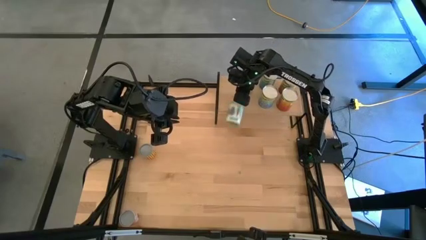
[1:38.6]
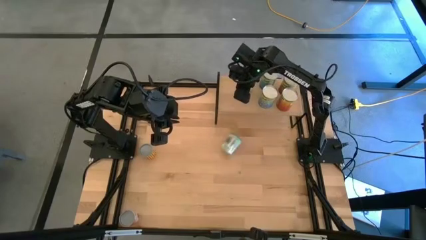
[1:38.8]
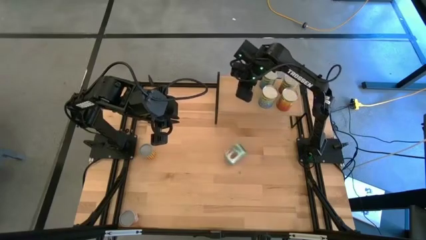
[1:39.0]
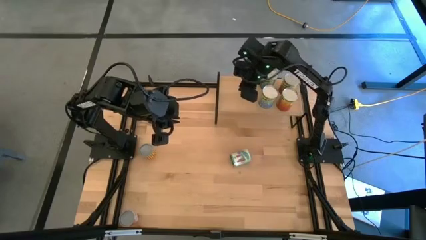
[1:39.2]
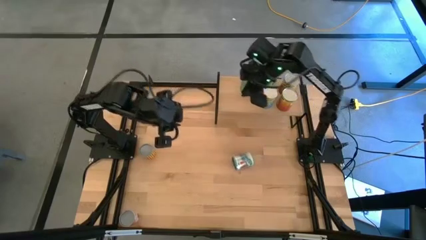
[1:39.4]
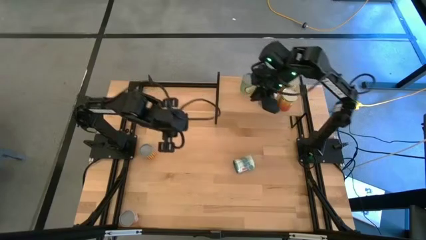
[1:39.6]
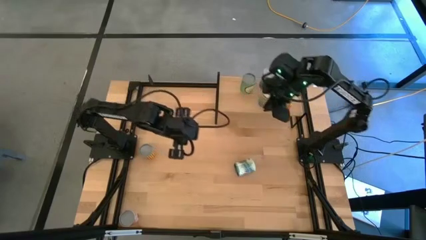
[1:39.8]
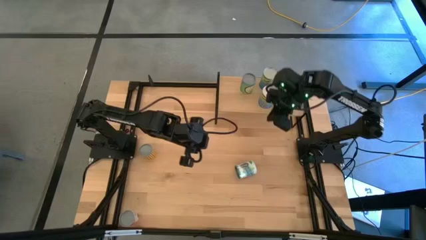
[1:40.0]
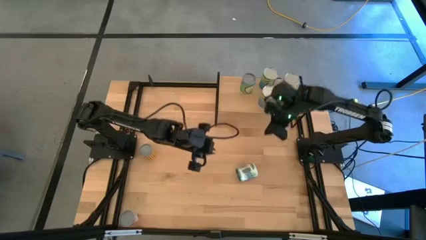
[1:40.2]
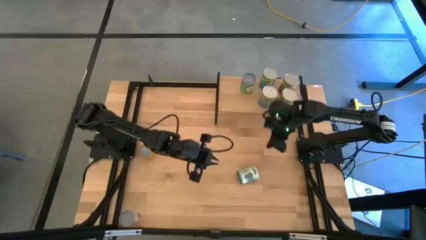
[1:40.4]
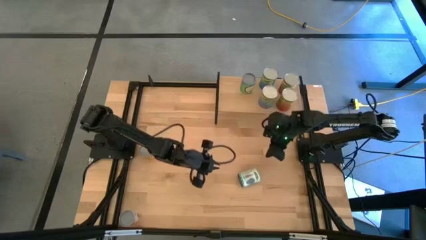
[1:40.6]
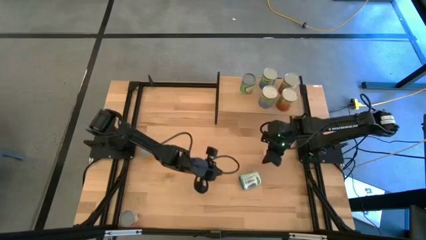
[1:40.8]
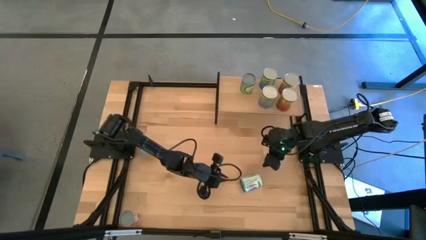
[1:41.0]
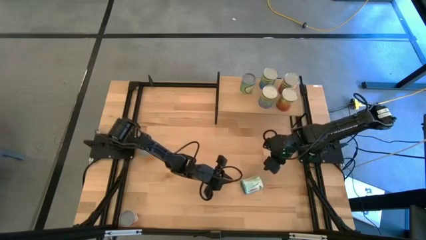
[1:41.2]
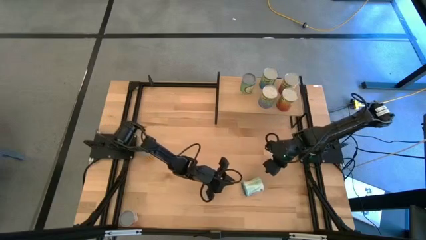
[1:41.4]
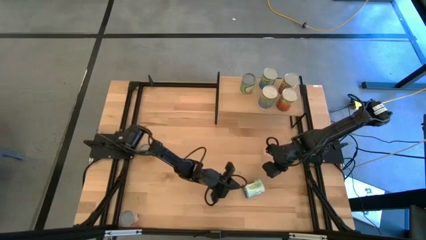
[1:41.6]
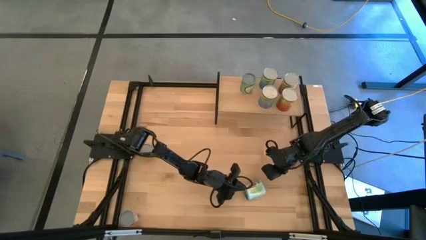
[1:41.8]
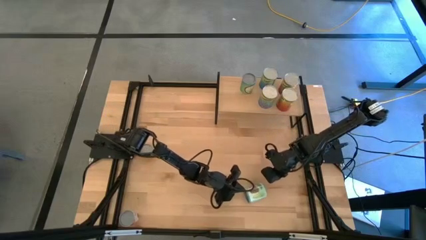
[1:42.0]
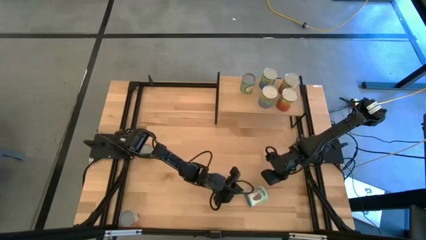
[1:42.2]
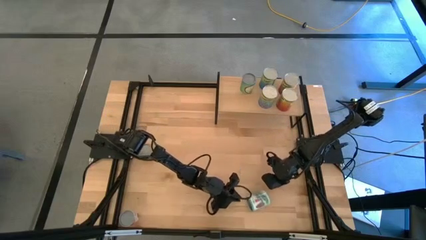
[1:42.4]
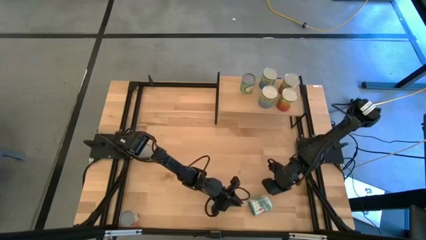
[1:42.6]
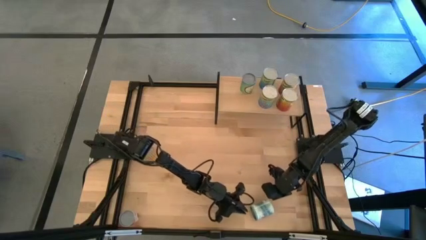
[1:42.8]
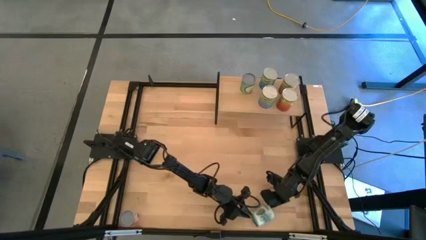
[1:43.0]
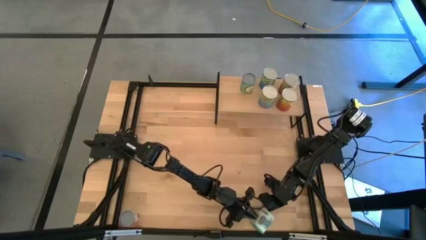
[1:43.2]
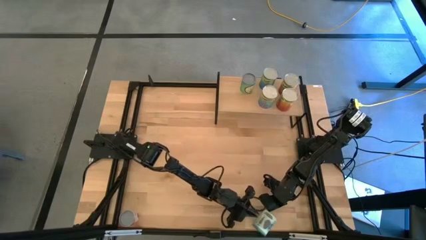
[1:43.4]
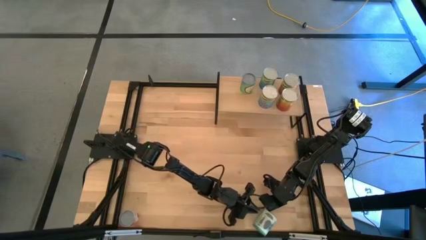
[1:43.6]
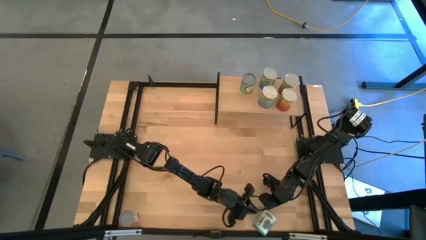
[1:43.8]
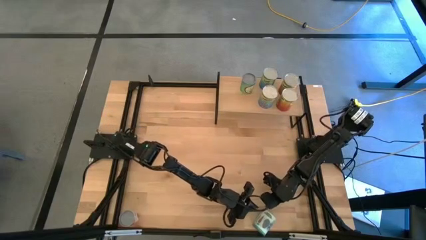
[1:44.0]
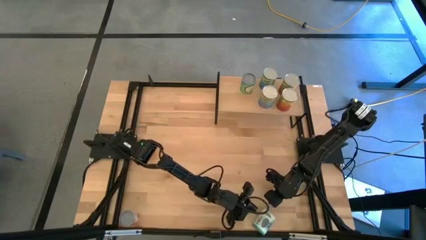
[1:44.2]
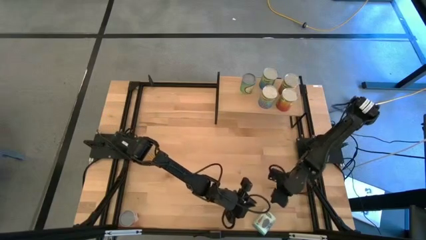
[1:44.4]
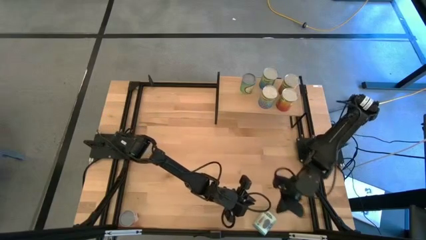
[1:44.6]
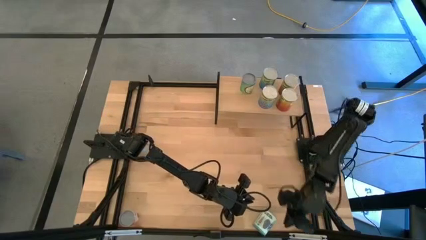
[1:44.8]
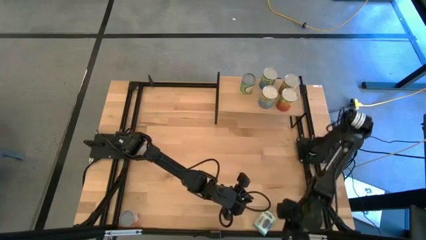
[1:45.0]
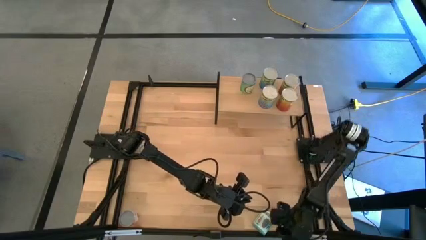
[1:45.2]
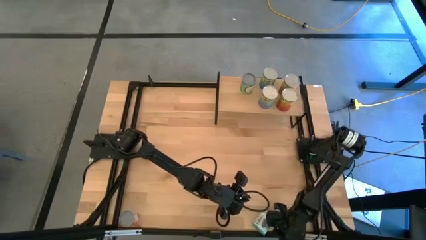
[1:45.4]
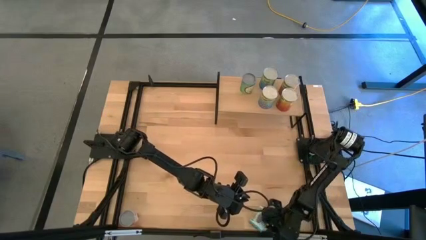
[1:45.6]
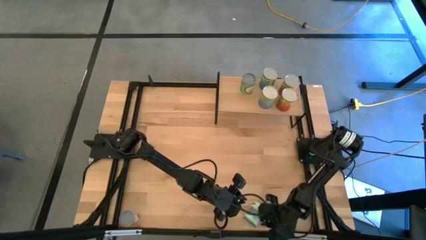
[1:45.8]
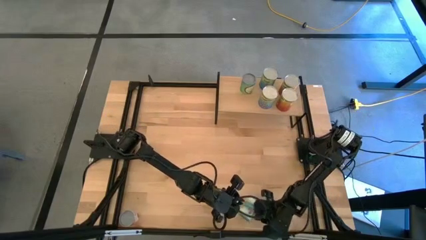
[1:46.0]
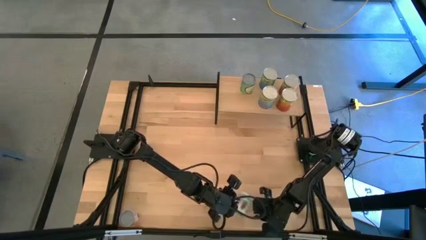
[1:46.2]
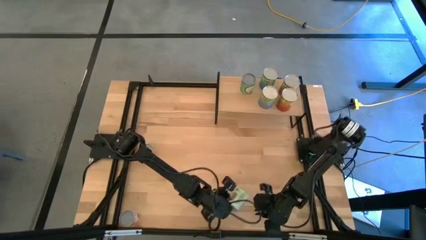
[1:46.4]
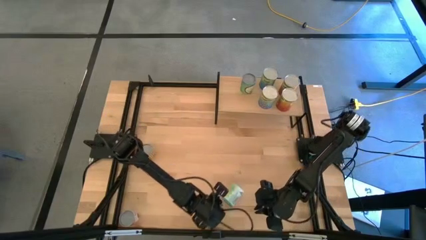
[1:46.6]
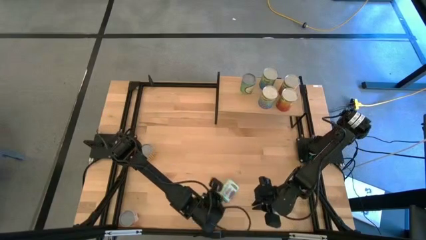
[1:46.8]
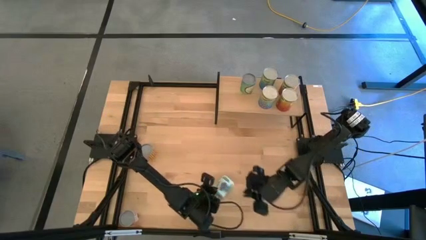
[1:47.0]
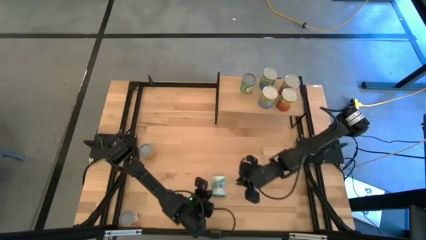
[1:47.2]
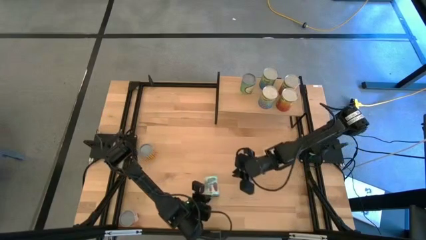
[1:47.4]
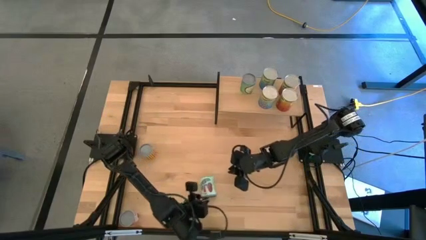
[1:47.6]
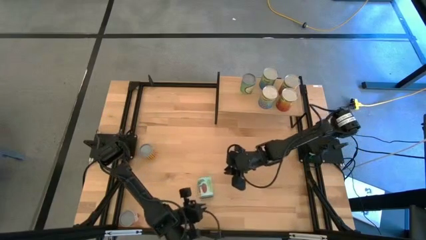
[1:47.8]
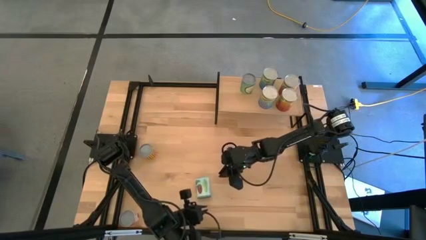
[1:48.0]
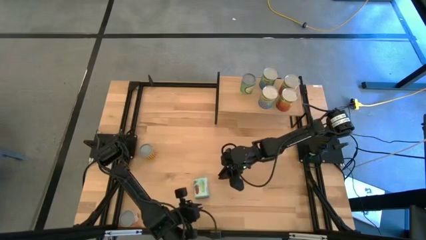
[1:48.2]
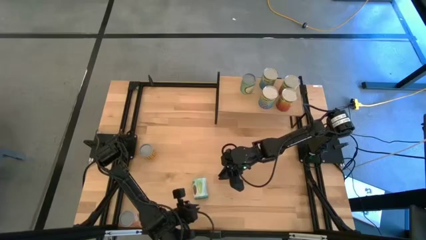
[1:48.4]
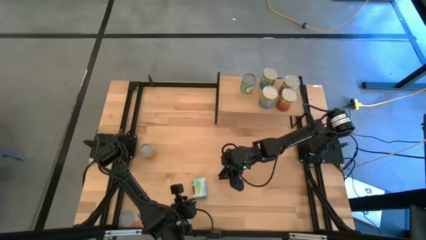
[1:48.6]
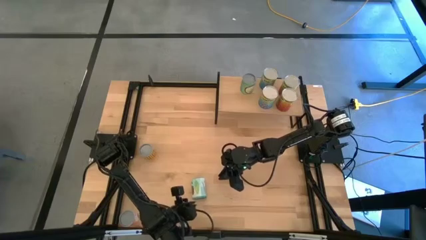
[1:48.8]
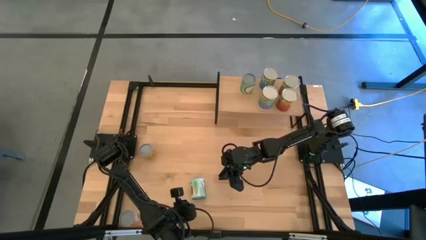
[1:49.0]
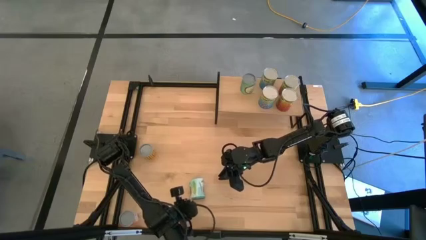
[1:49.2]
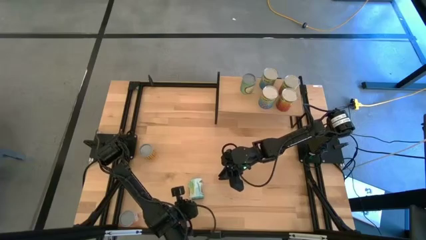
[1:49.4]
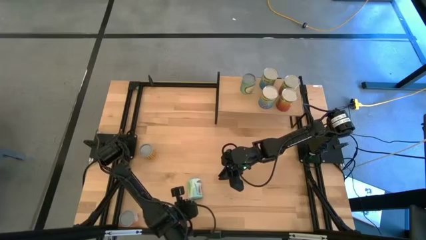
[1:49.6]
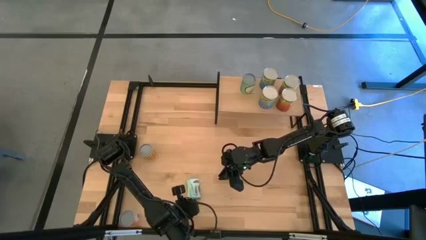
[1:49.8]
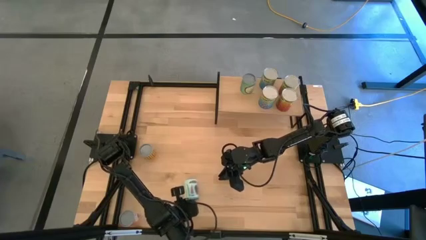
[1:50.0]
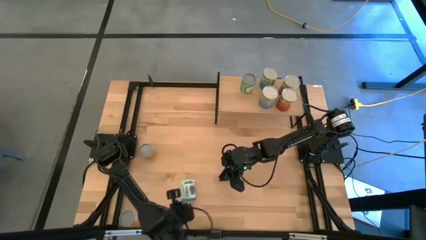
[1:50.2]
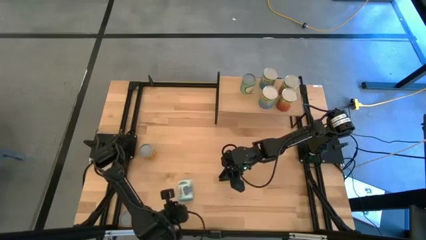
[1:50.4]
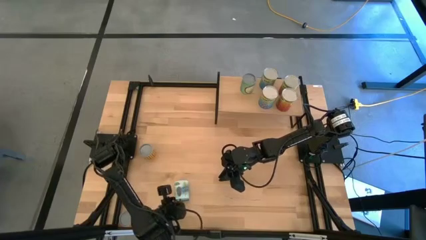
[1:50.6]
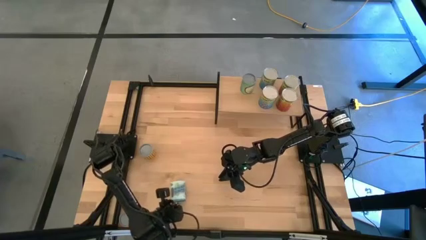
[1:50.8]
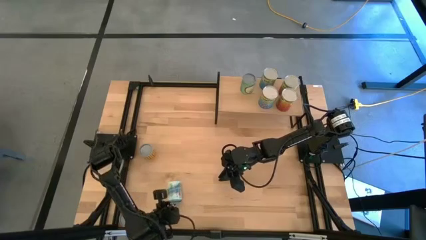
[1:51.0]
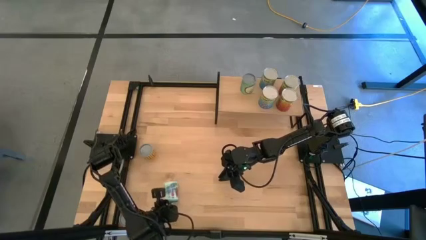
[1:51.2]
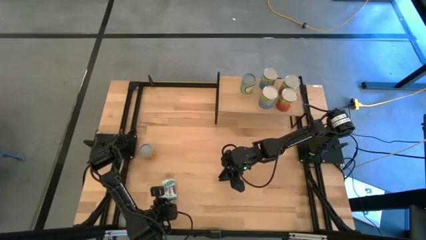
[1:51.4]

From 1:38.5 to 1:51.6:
Task: Pick and place cans onto a shelf
Put the white canned good on the shelf
